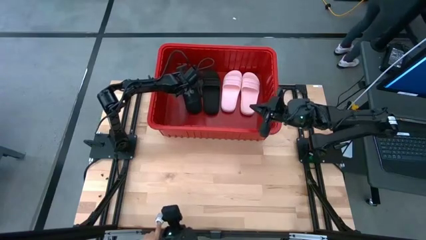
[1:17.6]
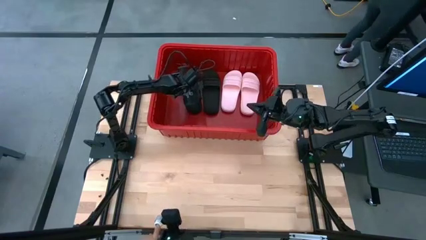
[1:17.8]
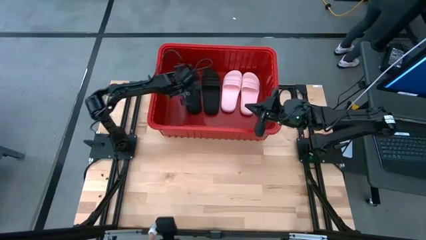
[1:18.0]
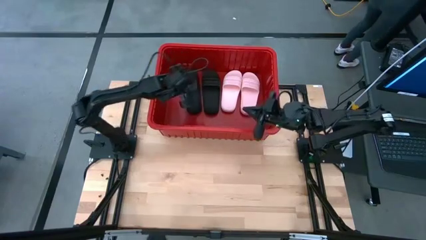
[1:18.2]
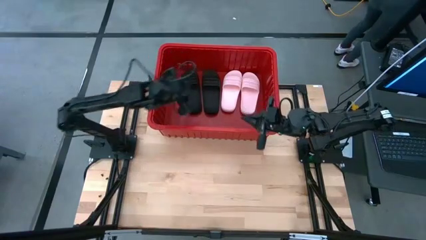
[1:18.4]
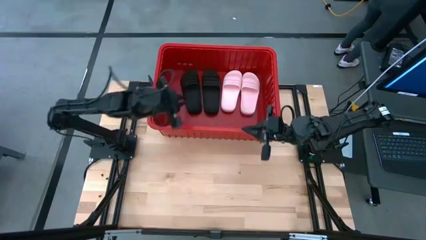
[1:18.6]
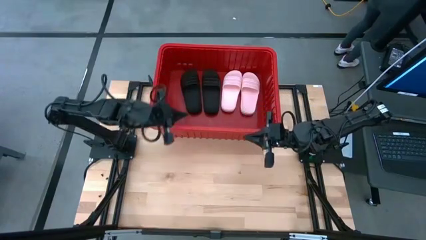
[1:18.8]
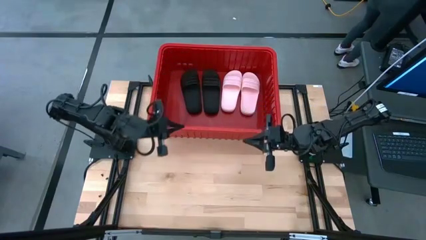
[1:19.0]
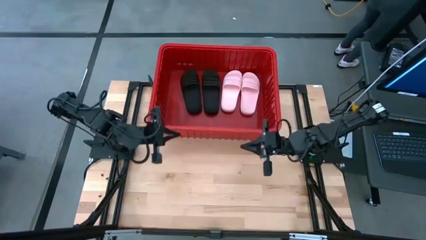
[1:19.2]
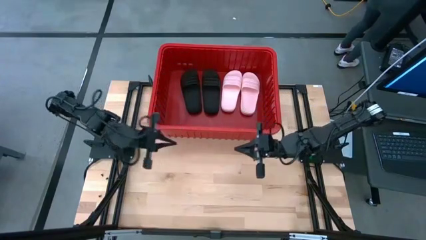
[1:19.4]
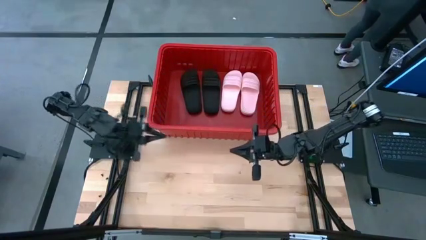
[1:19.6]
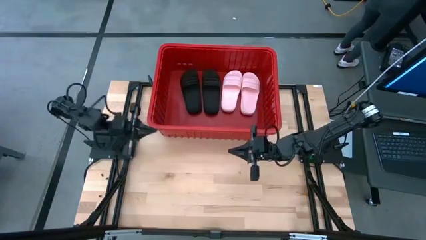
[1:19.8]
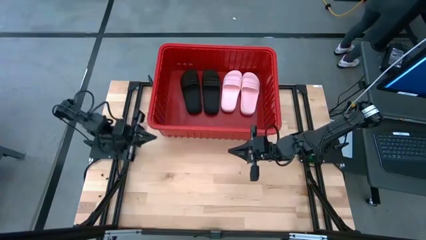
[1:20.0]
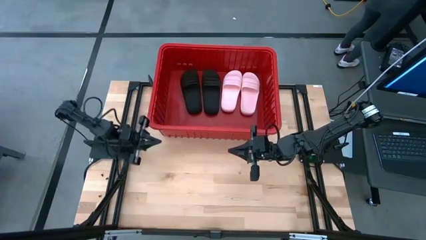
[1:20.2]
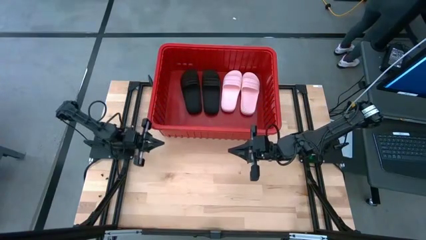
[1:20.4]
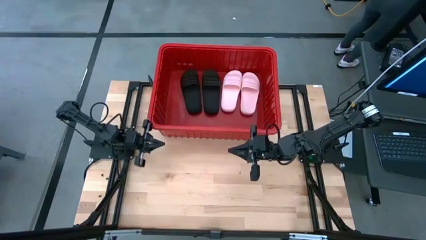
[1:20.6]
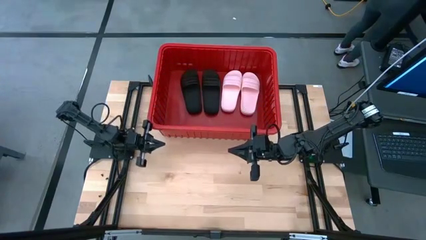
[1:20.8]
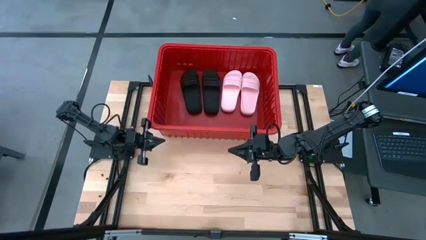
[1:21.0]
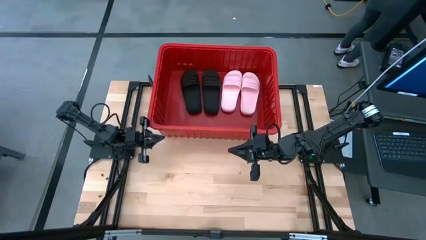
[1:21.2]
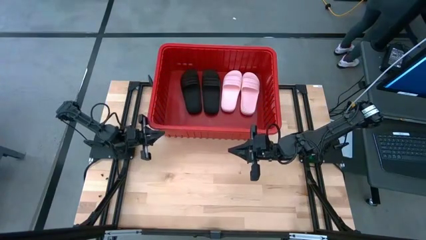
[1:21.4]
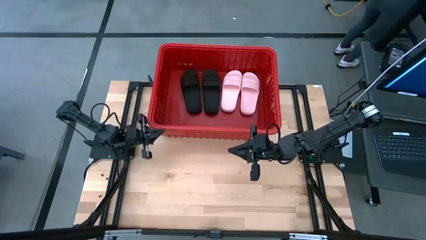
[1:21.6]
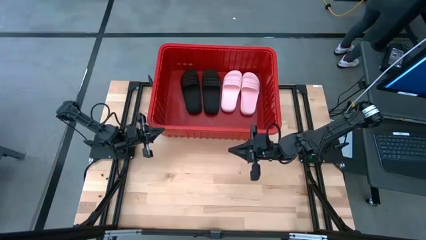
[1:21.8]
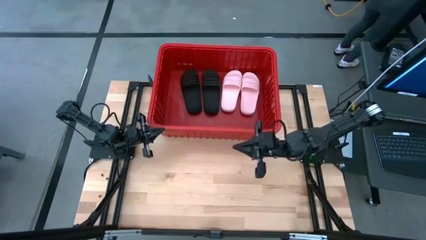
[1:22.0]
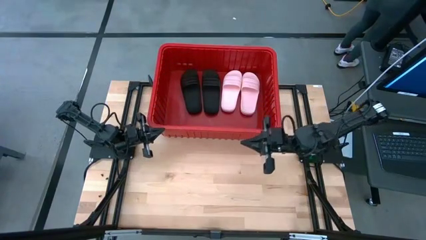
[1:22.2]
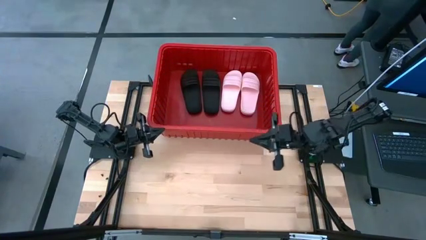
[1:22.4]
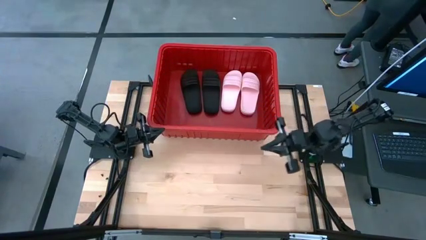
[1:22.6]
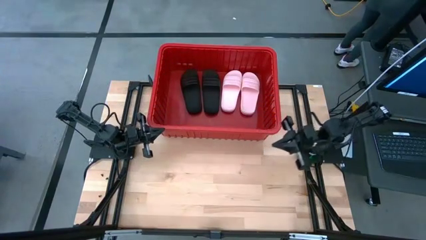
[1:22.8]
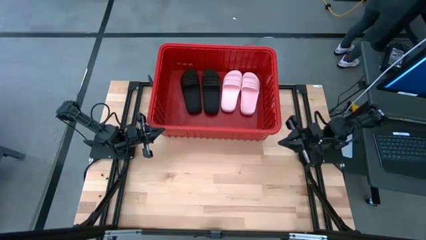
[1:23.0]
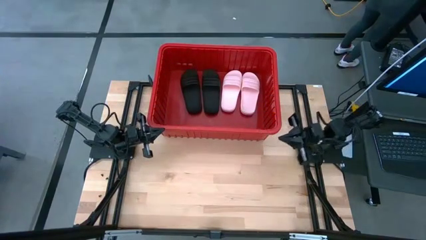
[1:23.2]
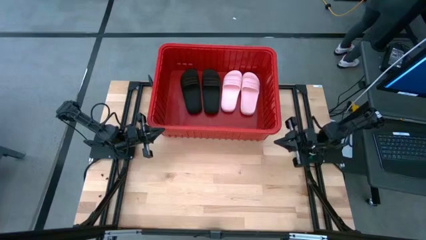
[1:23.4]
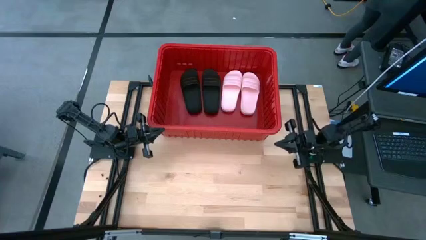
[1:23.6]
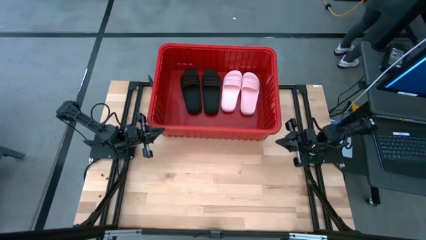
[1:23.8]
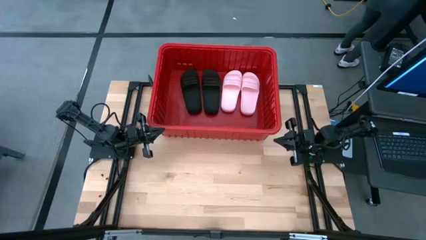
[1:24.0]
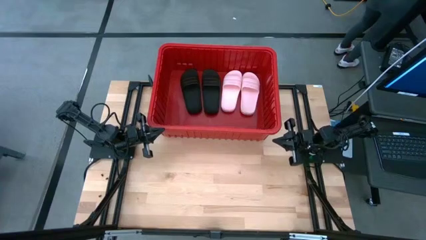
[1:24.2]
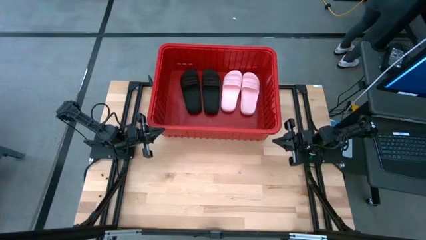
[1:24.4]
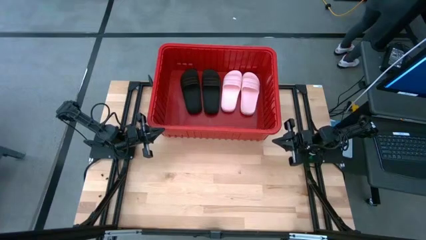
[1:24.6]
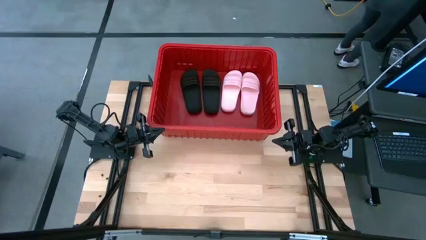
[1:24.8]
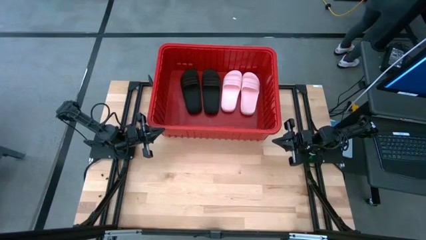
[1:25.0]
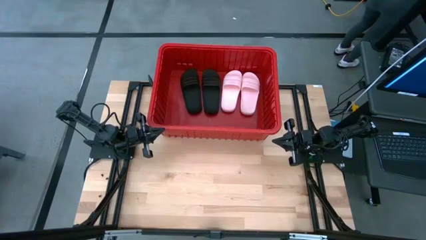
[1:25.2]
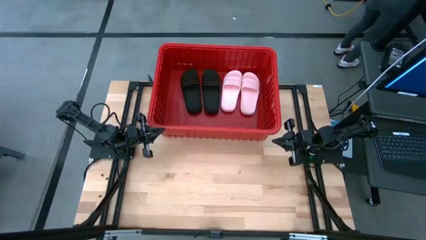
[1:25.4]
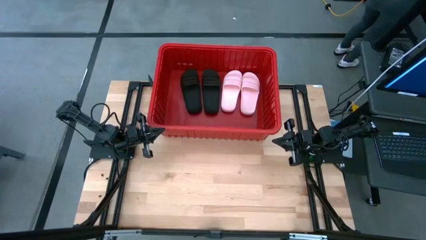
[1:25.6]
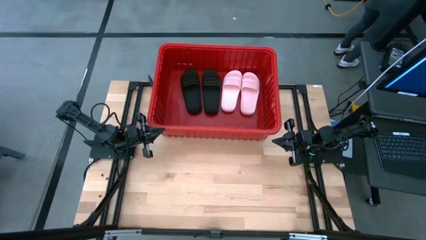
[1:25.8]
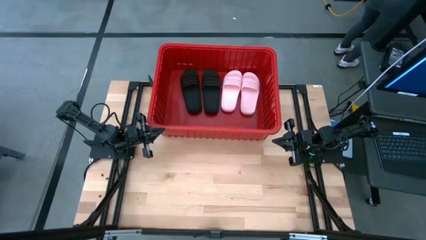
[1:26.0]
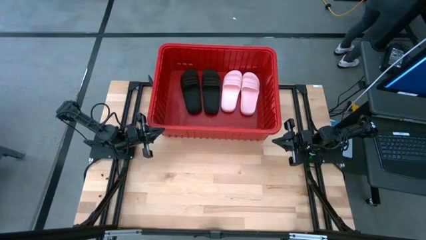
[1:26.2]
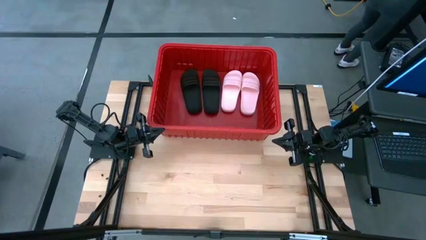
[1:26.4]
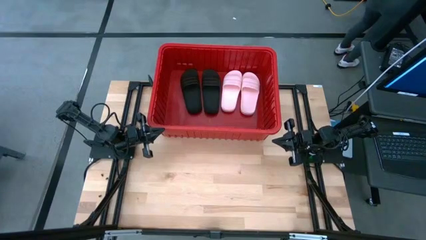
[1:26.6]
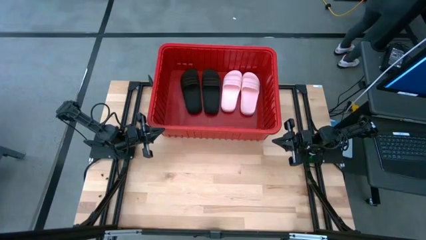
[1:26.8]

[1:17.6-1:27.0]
Task: Pick and place slides into bin
Return to Home Position

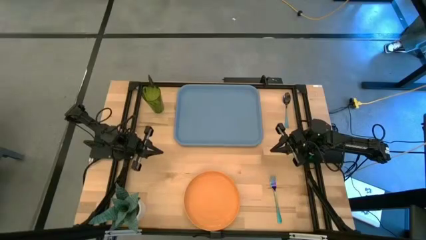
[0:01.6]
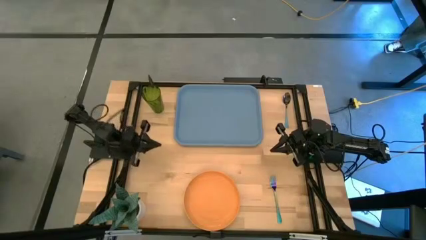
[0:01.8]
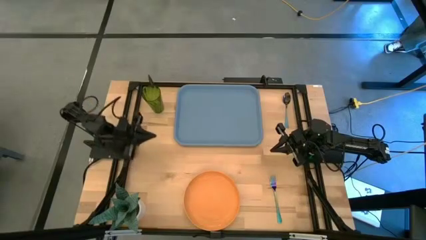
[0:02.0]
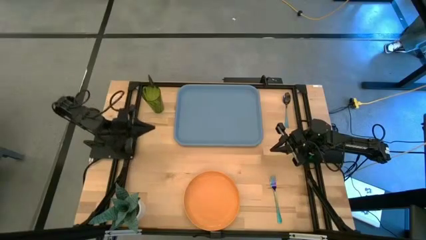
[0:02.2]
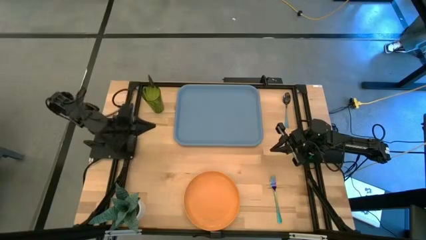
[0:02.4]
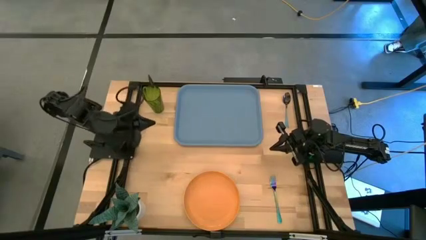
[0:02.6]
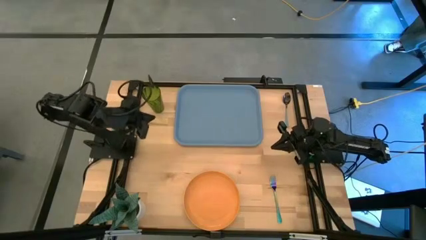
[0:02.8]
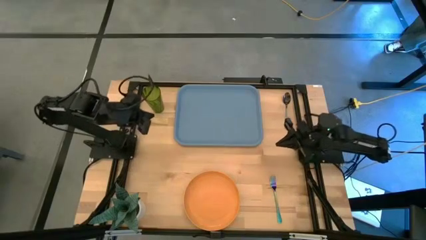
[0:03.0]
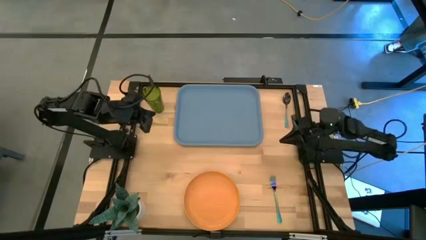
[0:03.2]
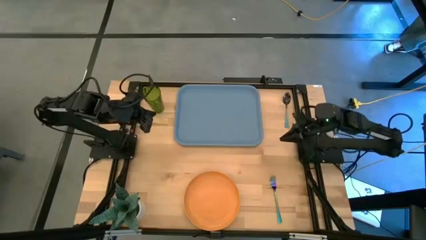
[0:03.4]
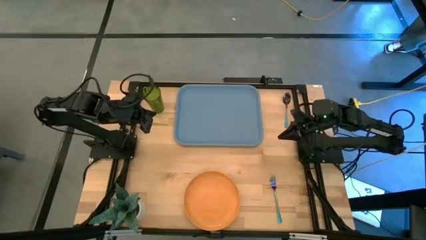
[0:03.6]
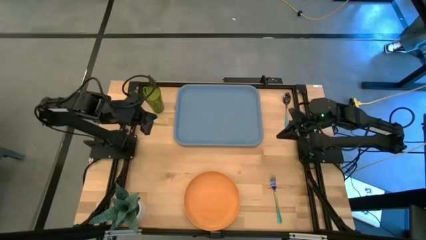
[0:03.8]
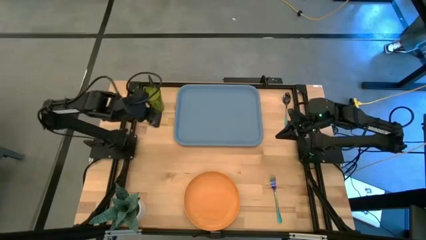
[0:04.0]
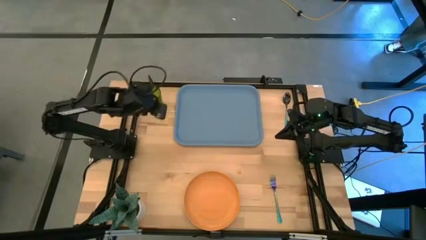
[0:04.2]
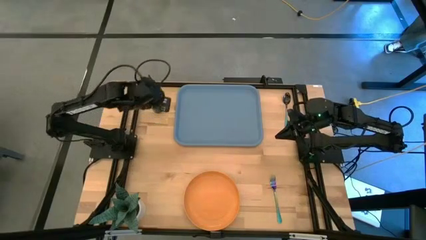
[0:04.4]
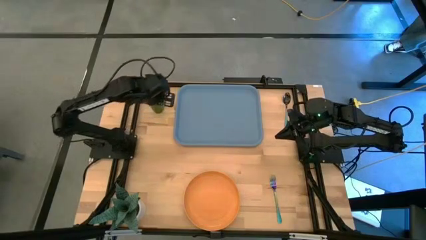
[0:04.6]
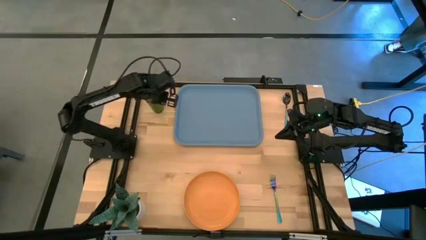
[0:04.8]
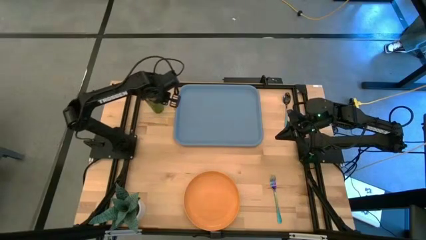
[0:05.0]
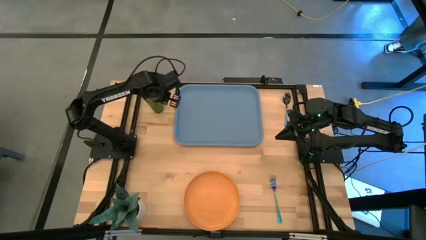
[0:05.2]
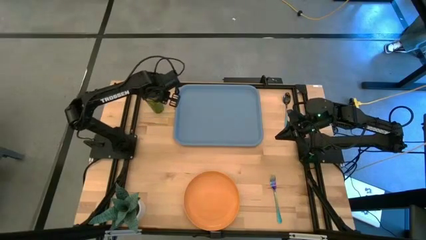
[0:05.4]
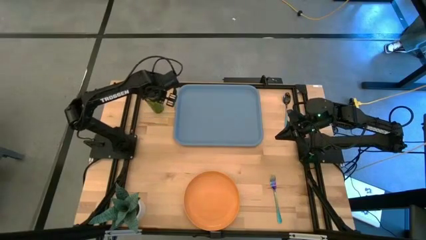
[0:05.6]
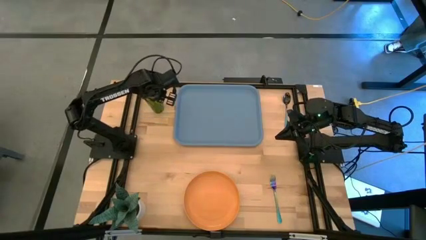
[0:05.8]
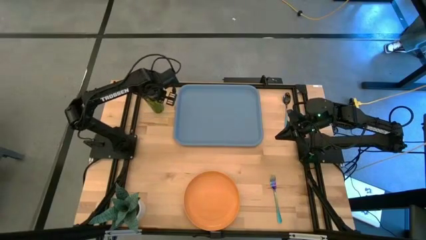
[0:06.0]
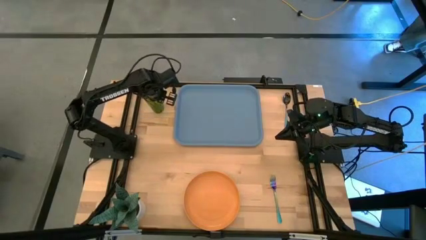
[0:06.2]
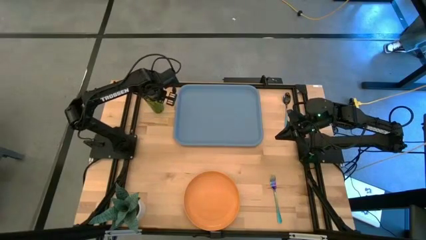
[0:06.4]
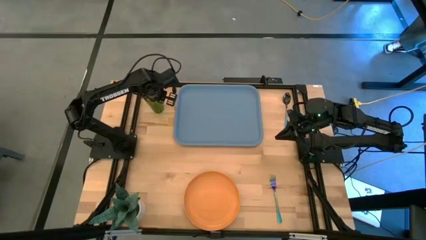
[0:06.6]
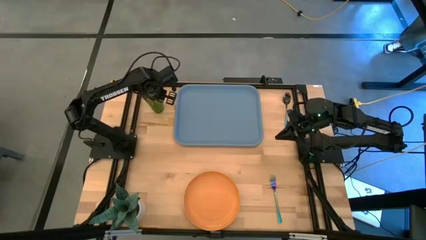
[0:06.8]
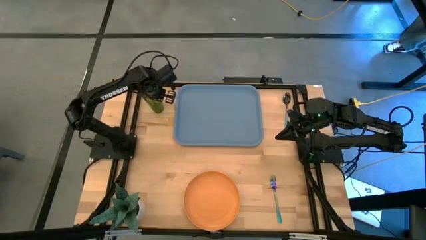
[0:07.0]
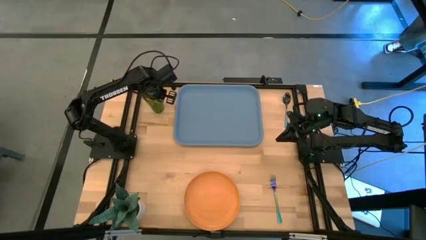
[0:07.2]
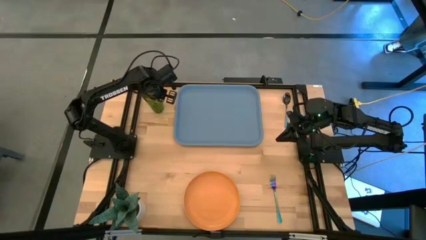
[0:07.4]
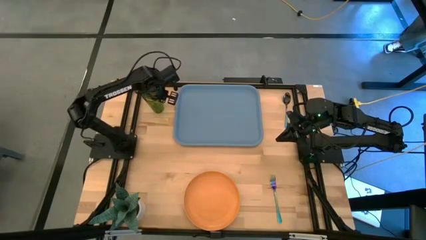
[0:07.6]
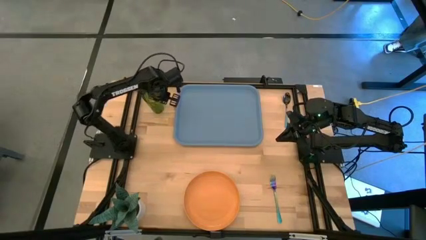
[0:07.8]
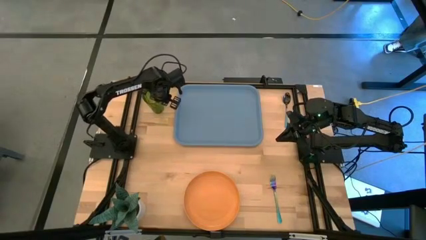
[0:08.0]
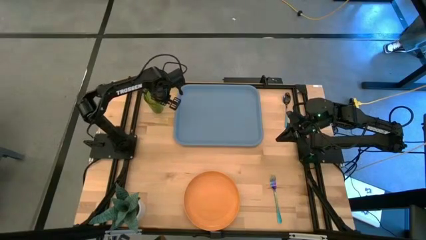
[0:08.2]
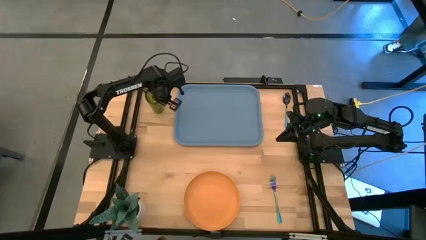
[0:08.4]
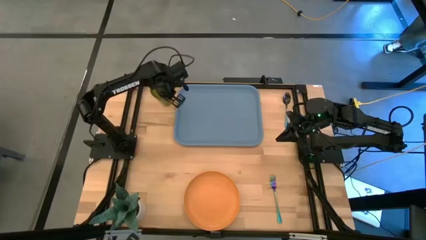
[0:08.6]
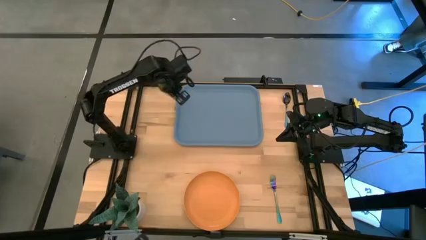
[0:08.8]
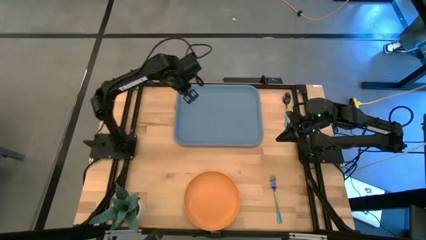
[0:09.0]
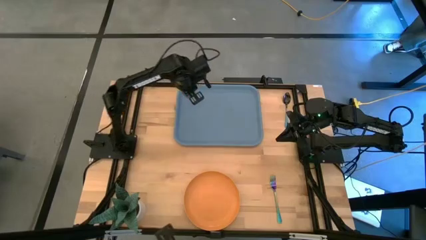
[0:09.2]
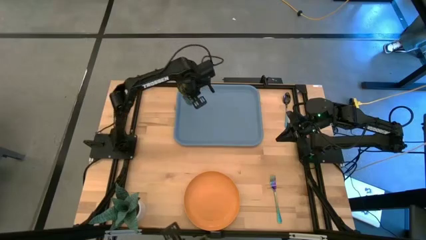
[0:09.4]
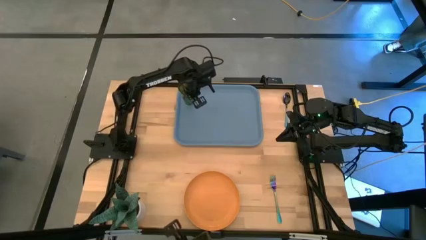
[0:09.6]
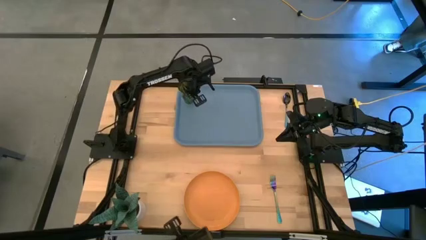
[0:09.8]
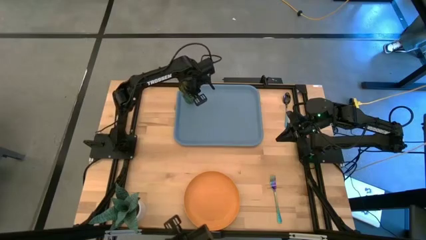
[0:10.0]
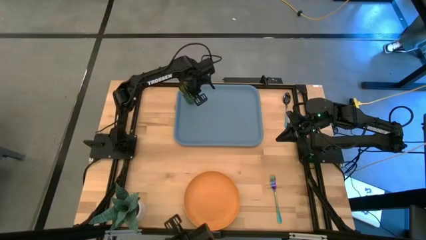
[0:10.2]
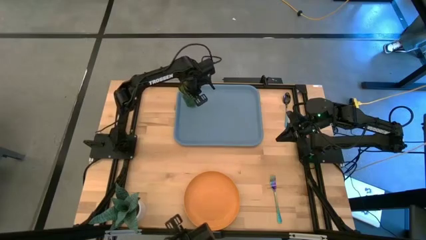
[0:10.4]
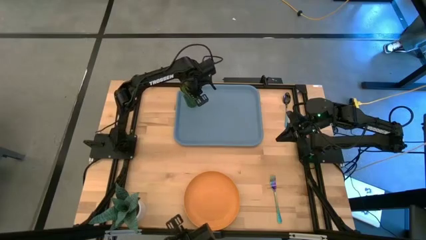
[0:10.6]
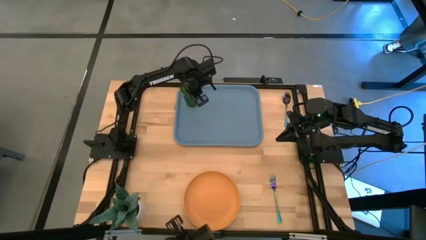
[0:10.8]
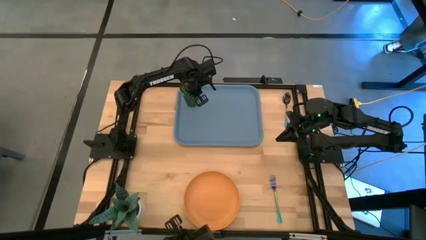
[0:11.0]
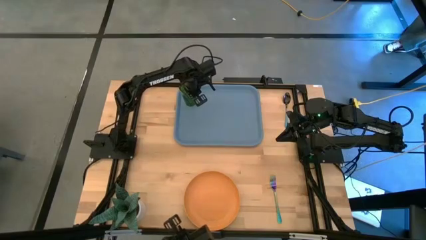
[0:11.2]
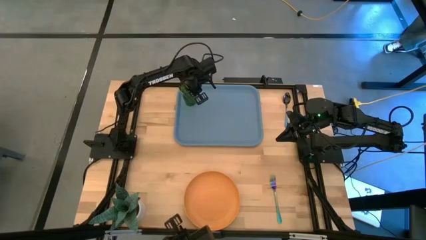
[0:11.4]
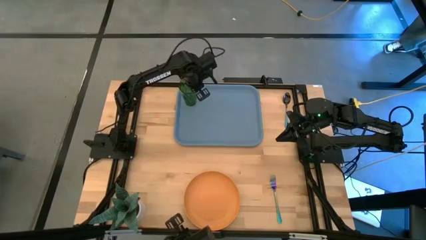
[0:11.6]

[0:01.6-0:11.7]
Task: Pick and place plate/cup/fork/spoon on tray
Put the green glass on the blue tray
